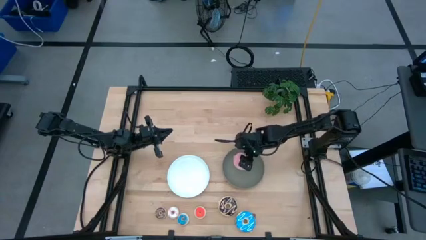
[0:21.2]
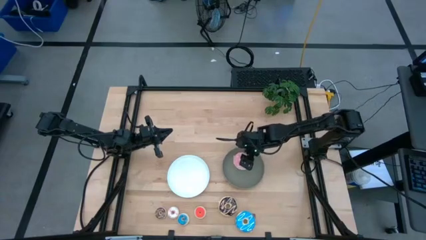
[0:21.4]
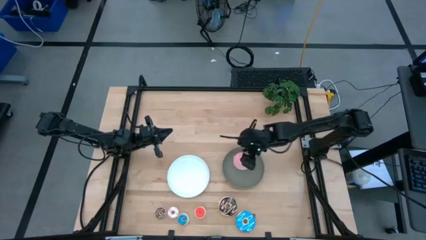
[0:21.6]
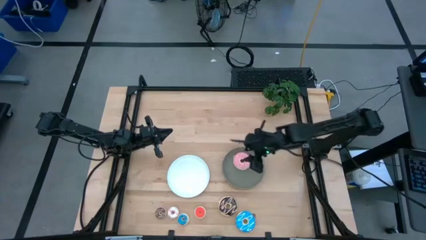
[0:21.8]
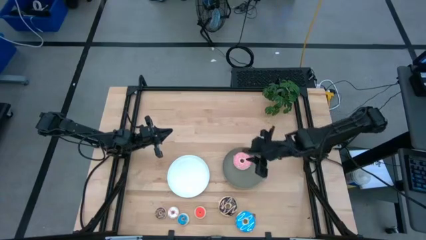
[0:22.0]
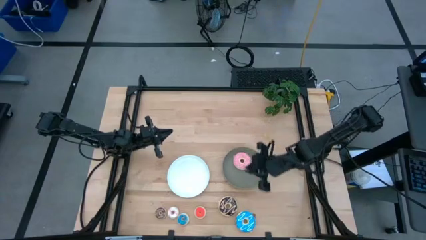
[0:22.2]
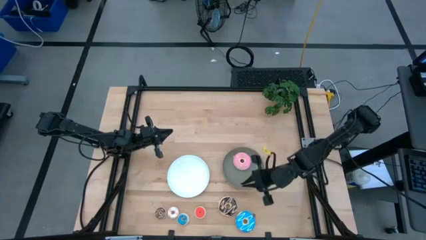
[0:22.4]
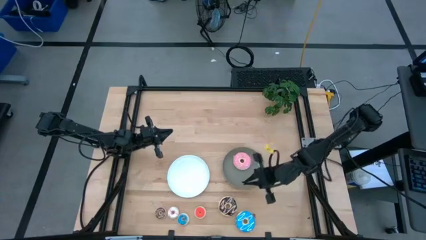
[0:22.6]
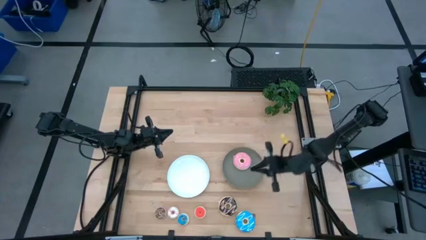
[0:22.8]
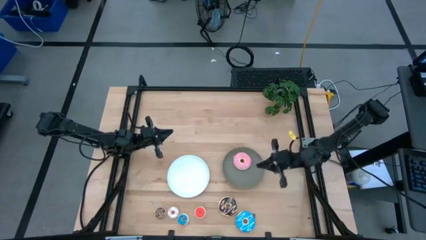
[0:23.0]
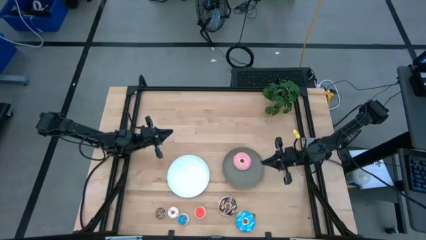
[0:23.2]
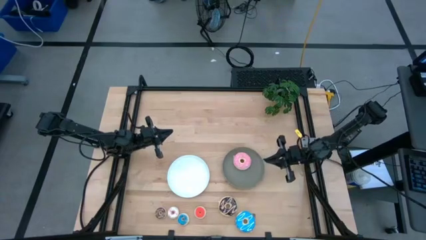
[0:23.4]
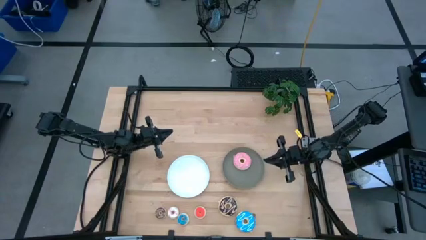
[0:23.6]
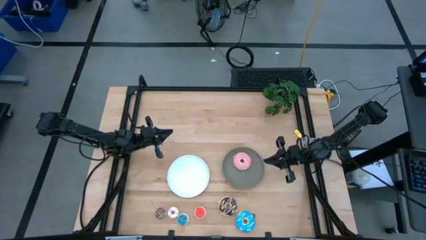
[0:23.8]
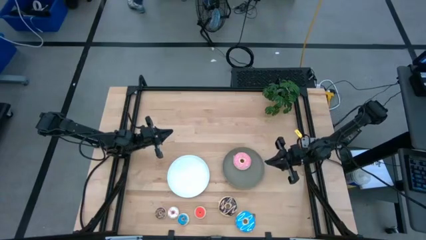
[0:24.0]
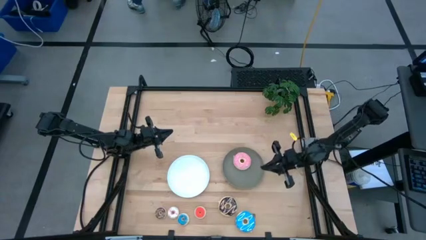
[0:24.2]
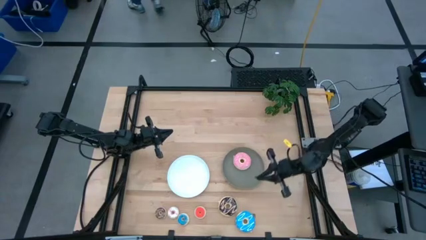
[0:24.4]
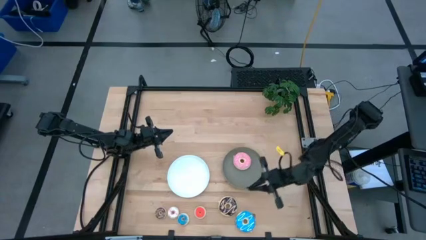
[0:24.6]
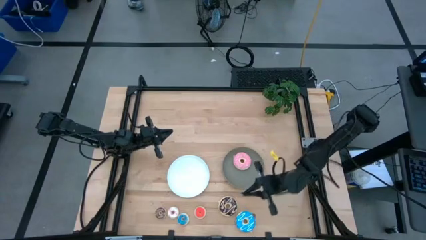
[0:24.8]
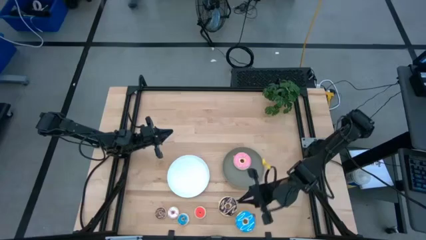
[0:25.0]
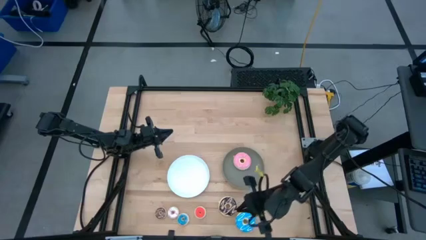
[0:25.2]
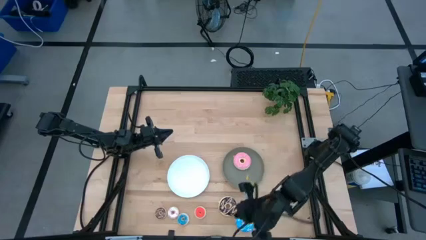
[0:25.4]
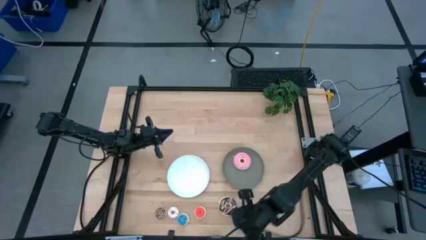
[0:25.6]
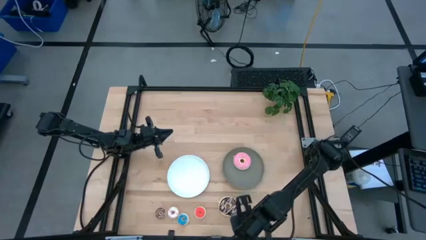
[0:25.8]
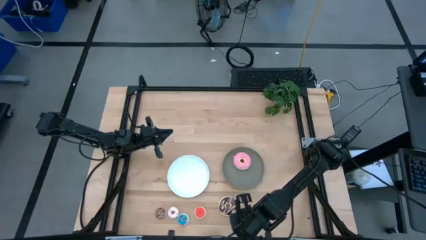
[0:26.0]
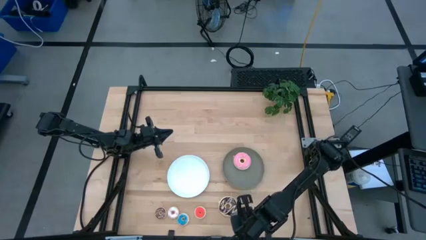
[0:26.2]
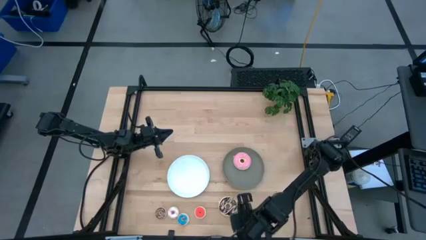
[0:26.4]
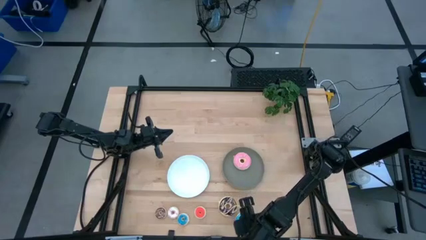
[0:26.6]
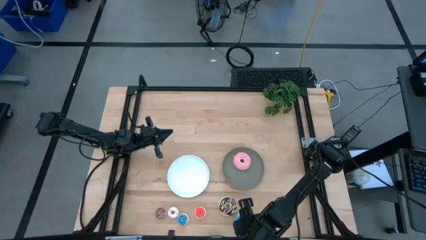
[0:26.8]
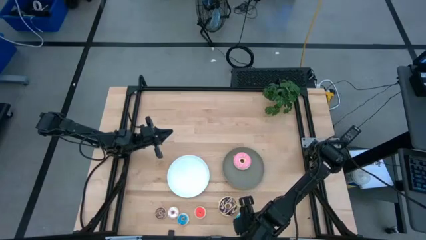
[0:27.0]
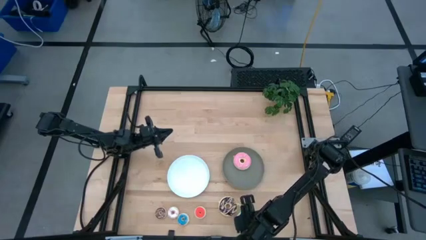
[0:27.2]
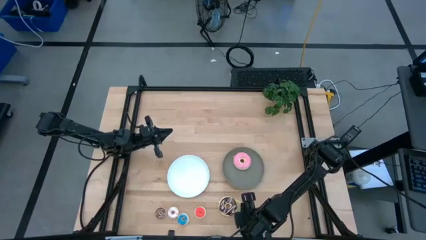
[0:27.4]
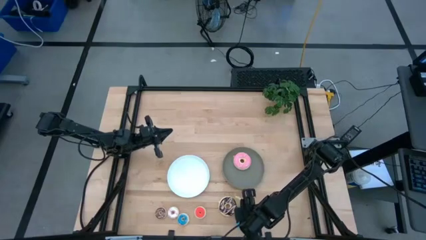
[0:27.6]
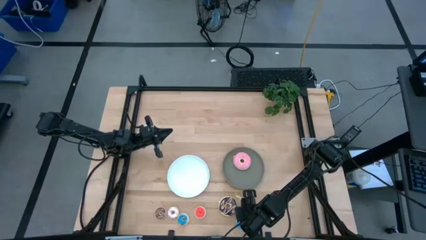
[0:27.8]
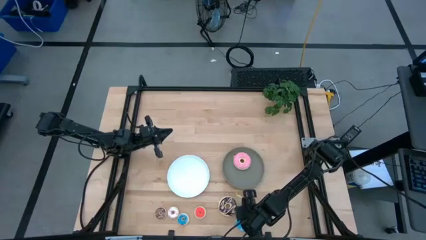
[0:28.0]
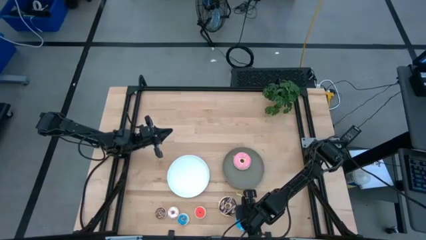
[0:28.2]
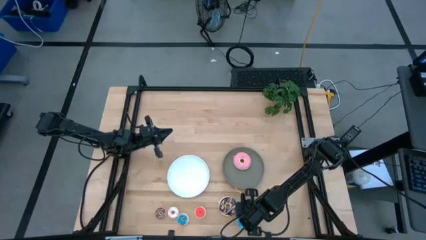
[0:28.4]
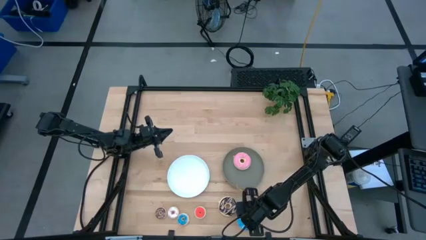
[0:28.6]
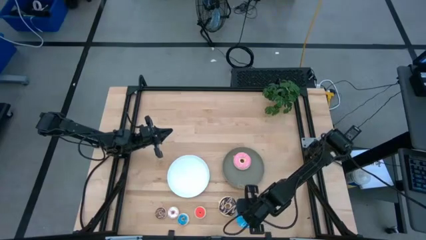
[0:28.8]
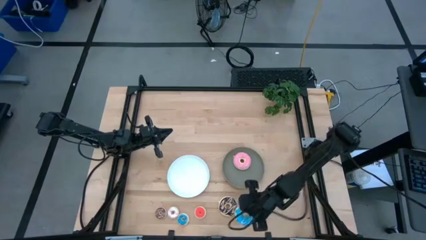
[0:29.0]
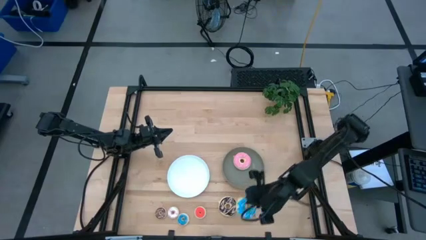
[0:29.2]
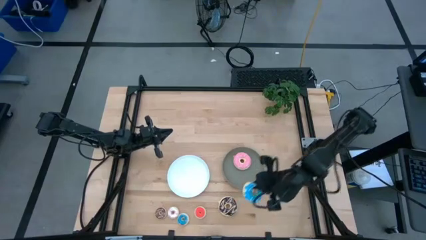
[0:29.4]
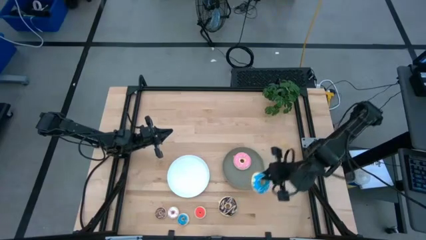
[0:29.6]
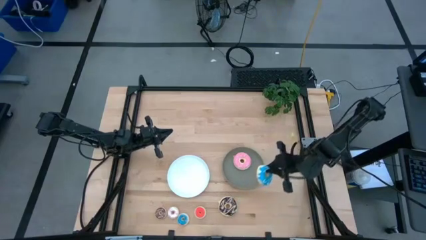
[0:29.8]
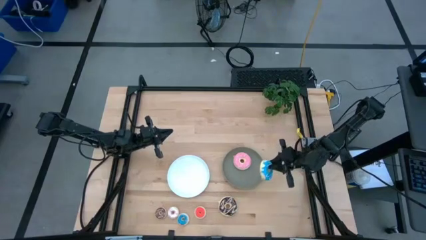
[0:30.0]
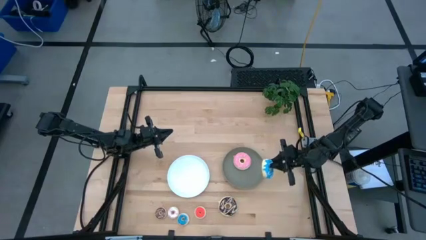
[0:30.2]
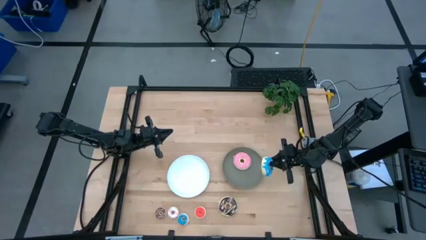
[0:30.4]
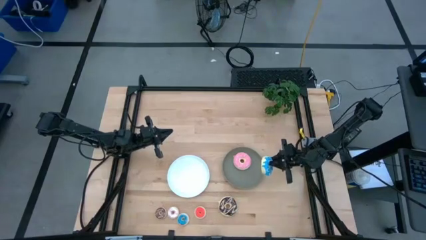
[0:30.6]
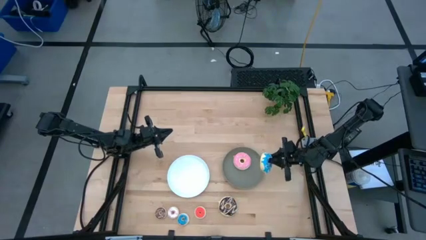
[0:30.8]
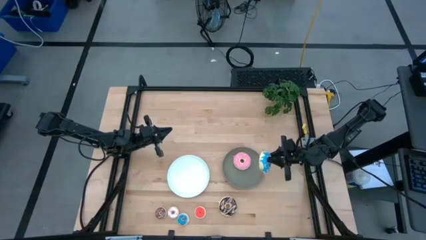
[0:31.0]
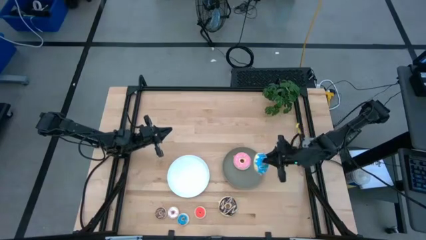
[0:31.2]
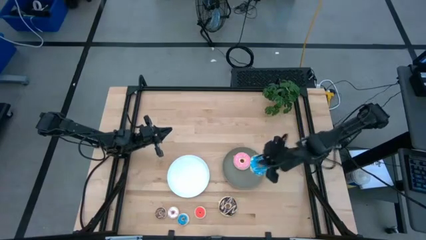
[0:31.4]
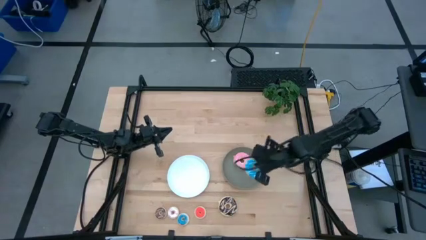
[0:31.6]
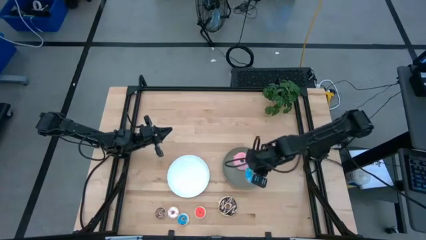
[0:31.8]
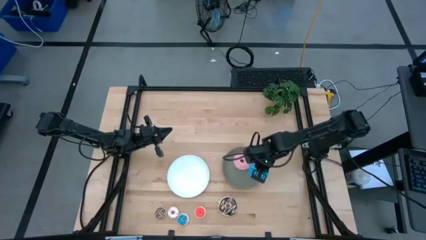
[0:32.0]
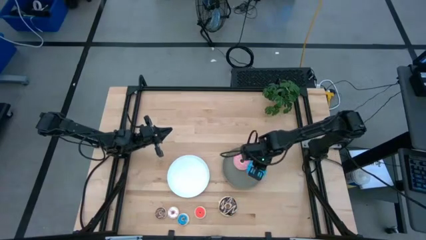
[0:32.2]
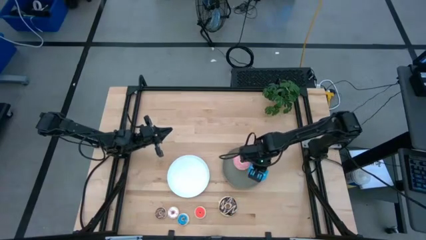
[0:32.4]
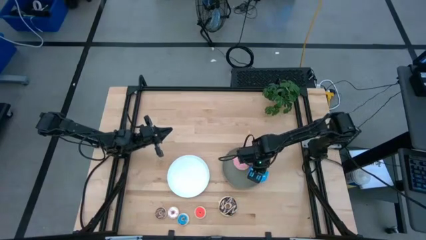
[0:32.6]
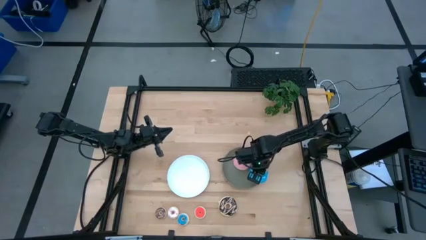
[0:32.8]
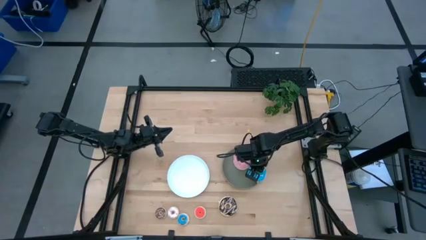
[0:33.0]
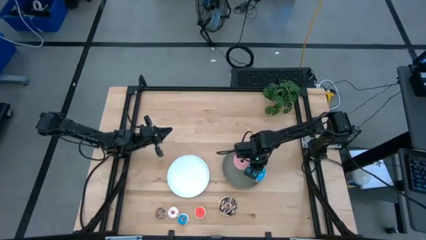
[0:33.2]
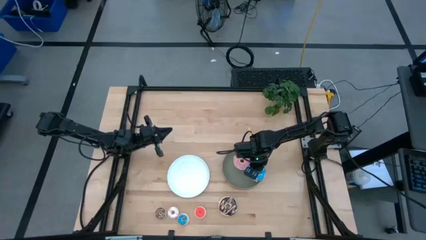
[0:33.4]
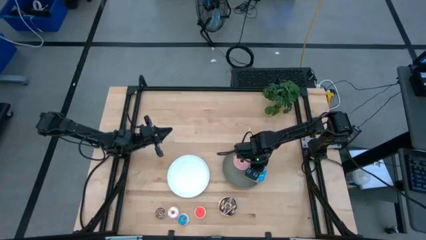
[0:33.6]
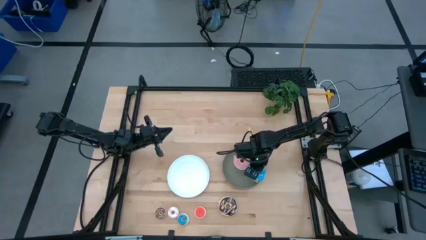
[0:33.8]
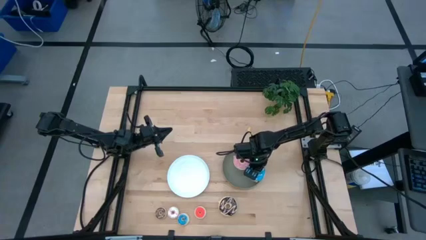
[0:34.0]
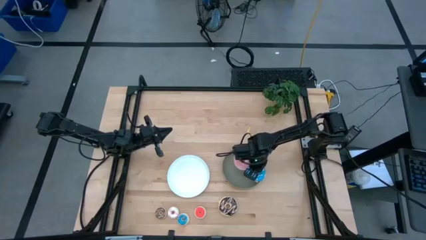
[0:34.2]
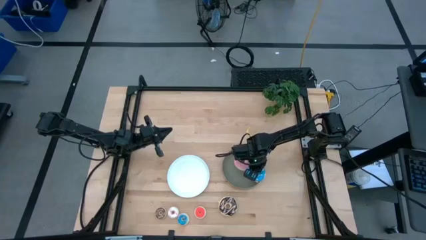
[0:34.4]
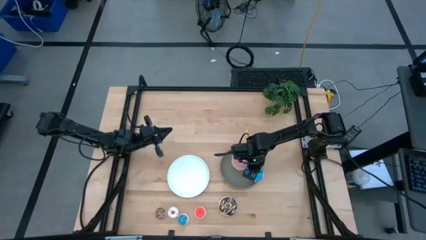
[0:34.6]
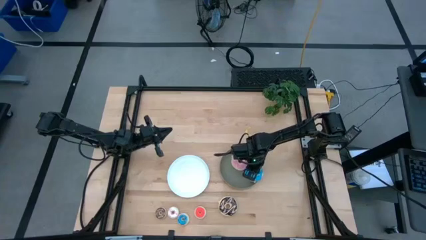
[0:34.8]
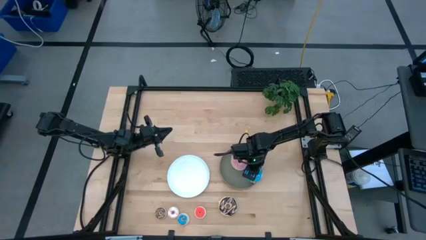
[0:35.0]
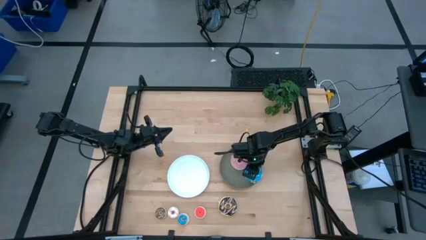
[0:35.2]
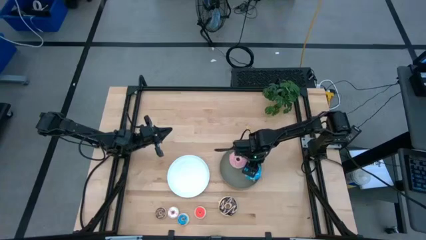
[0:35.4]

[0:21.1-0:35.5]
Task: Pick & Place donuts
Put the large blue donut on the brown plate
